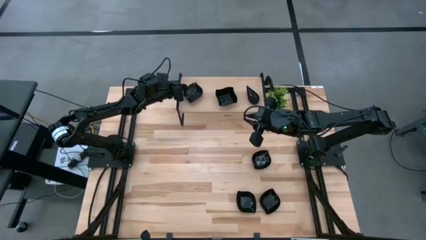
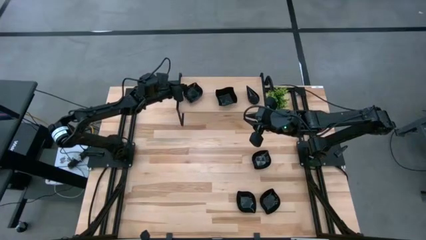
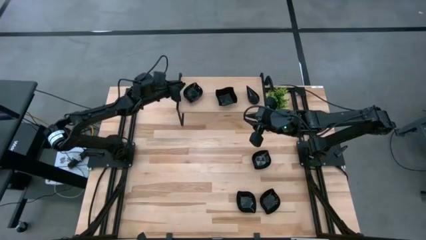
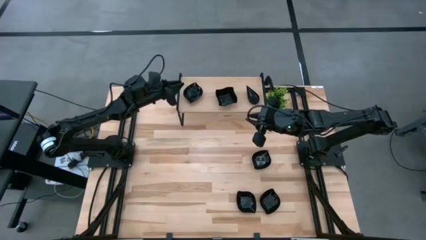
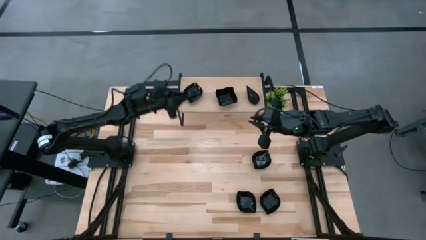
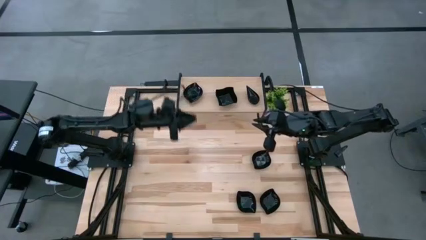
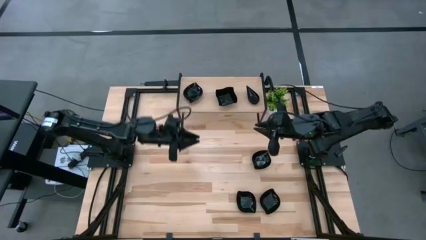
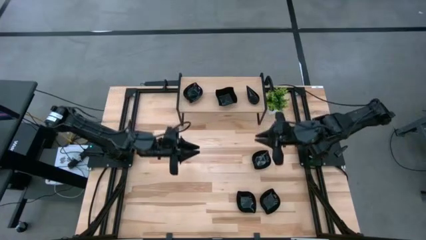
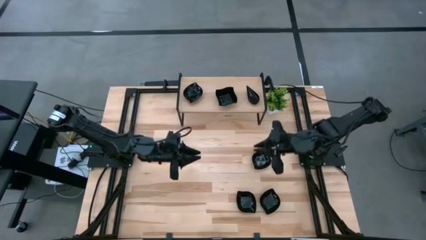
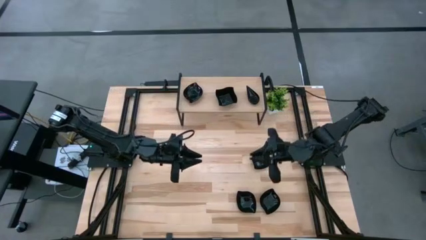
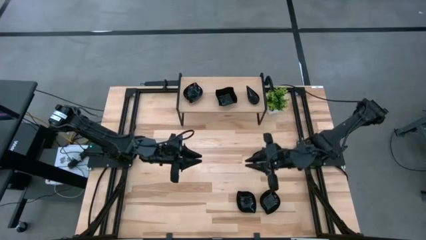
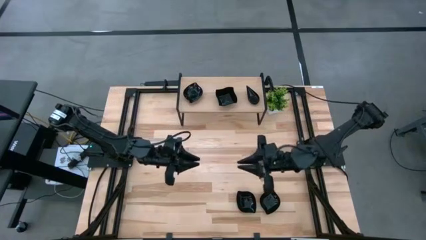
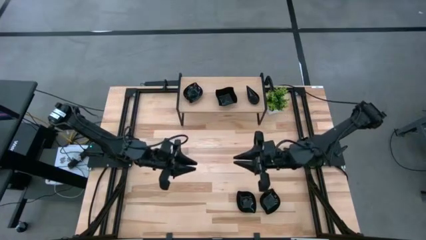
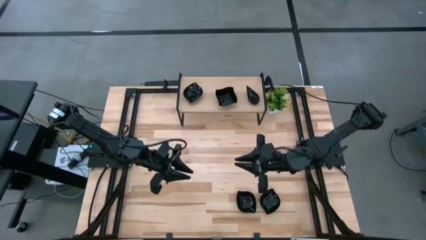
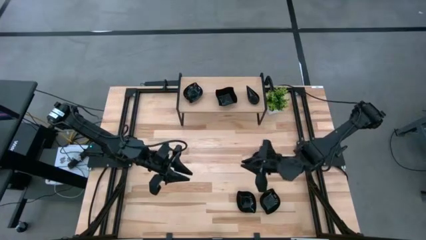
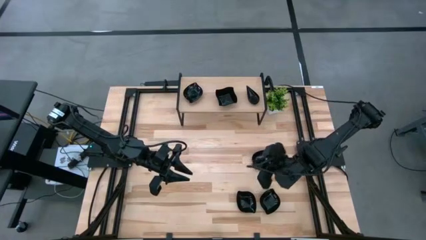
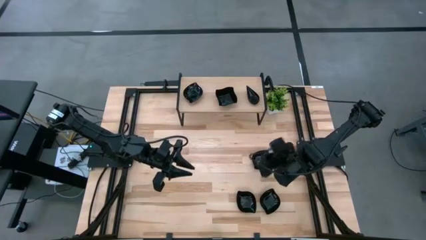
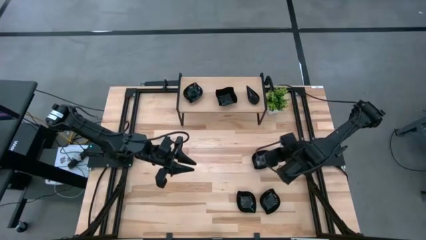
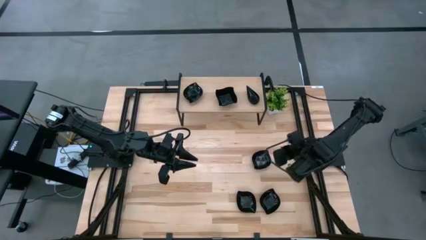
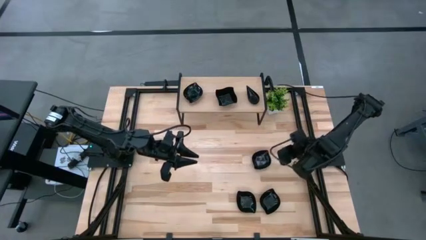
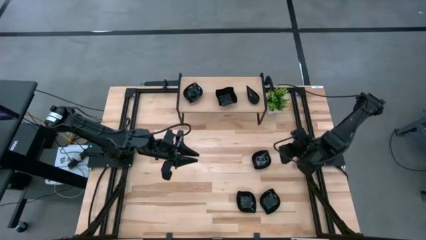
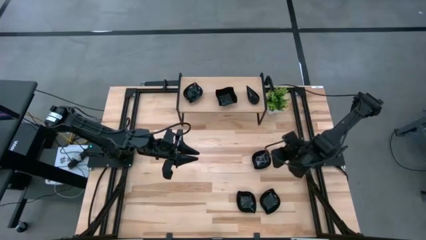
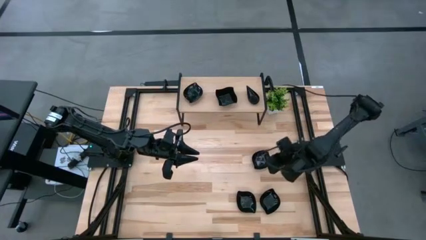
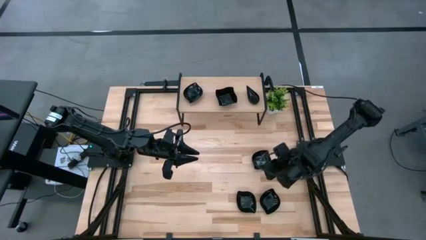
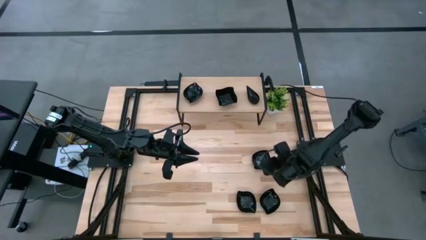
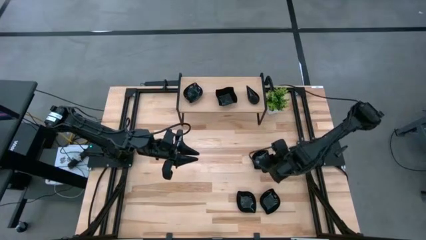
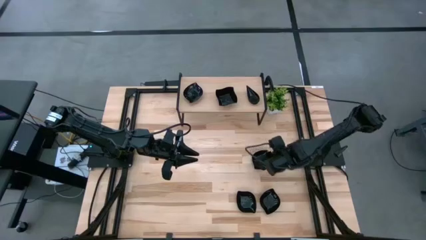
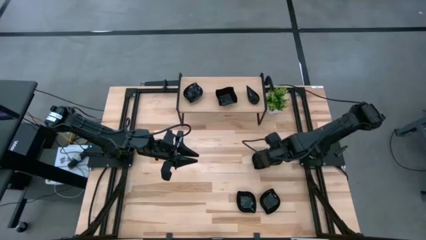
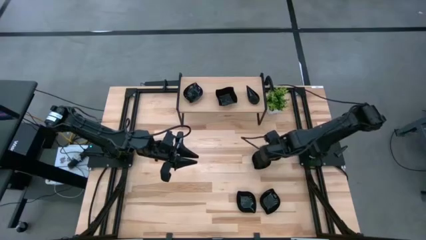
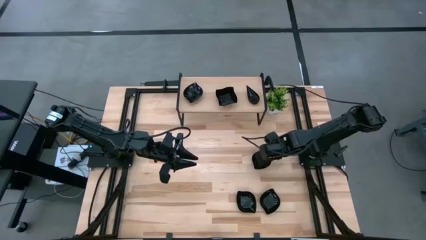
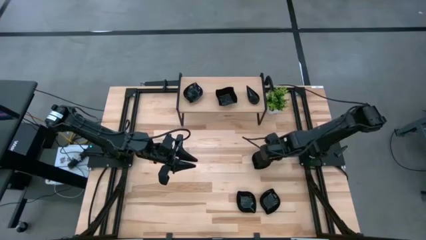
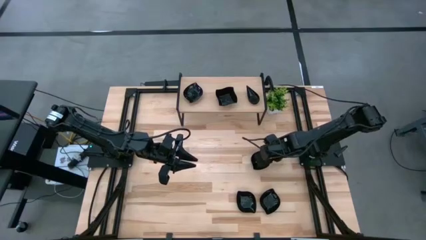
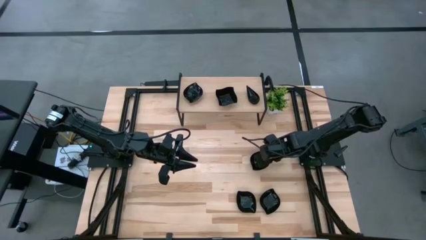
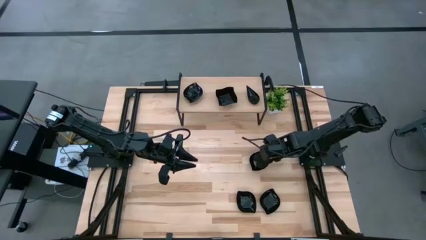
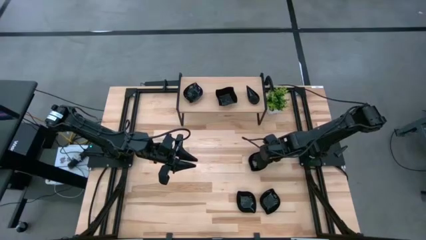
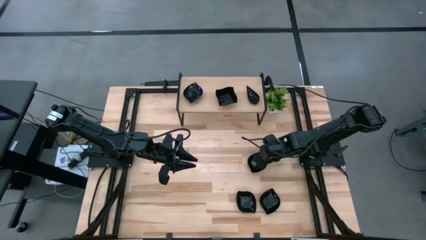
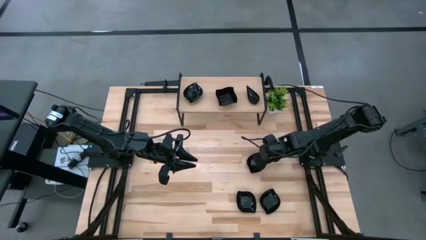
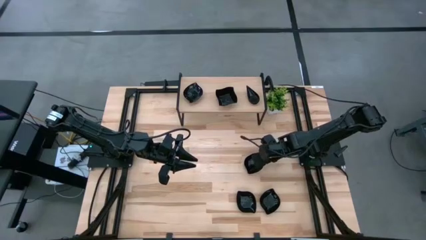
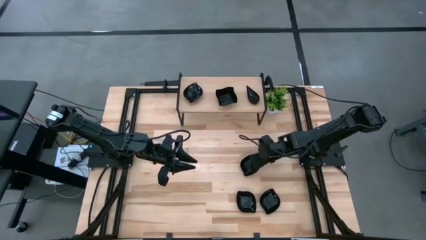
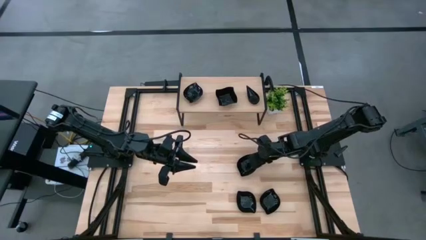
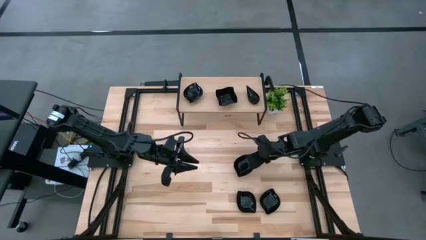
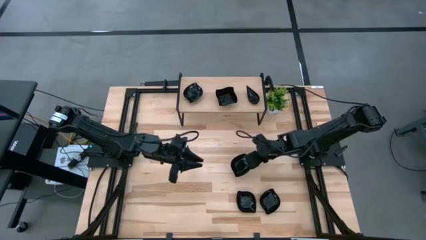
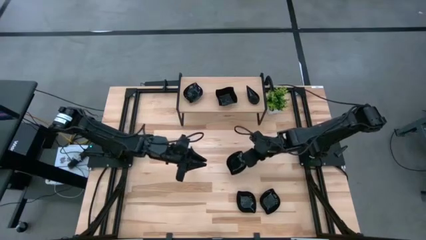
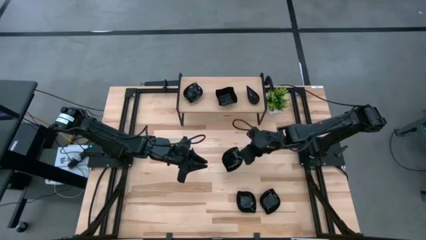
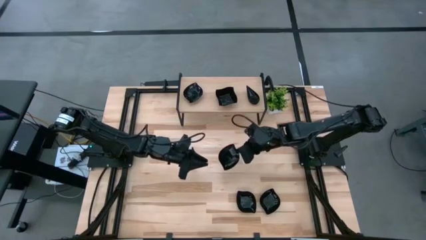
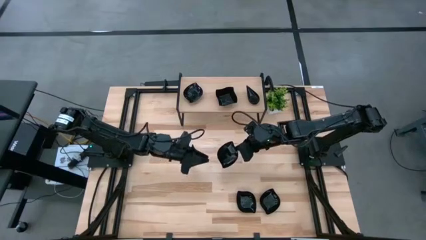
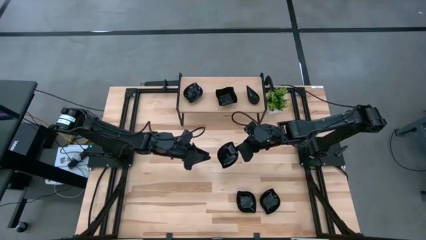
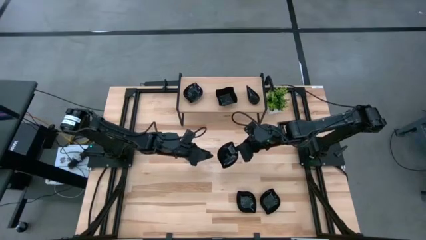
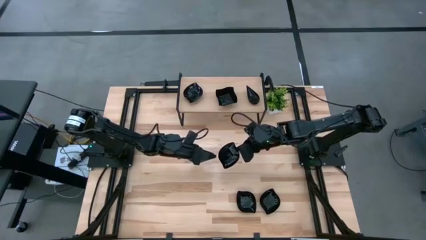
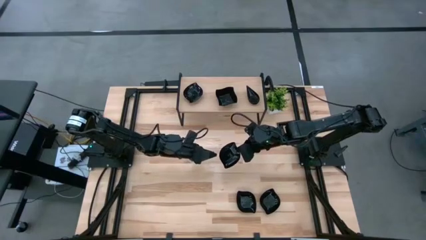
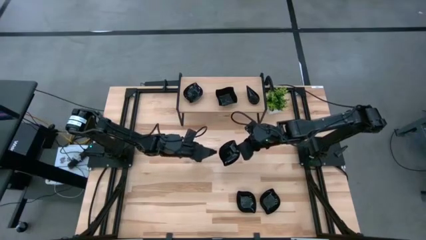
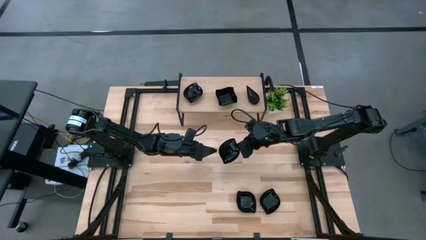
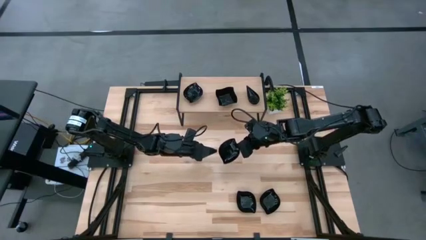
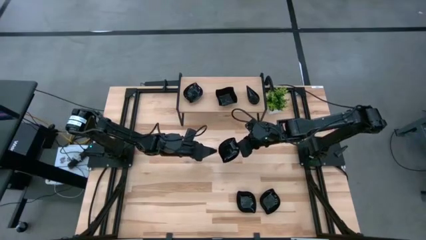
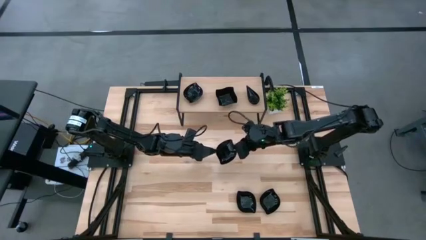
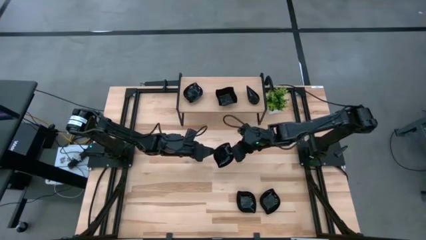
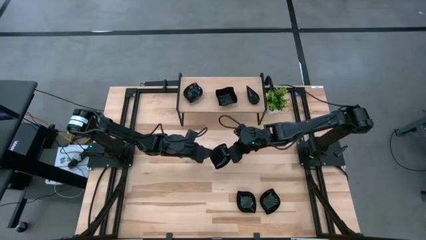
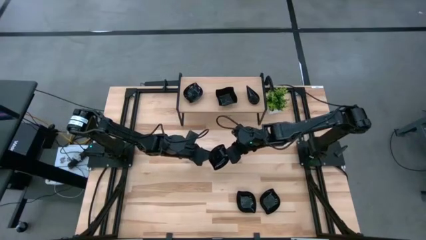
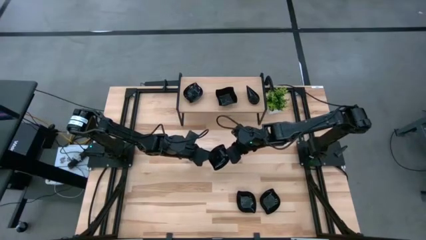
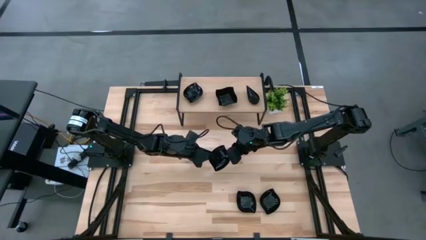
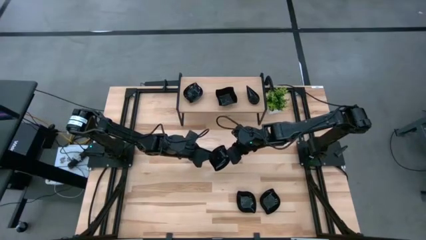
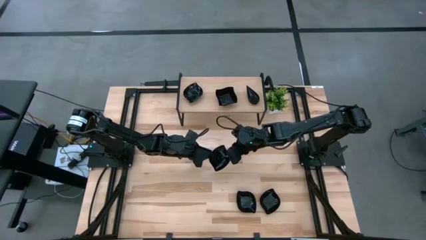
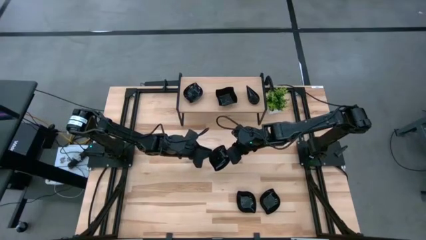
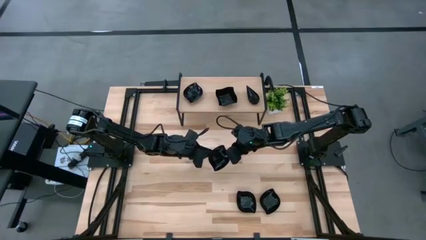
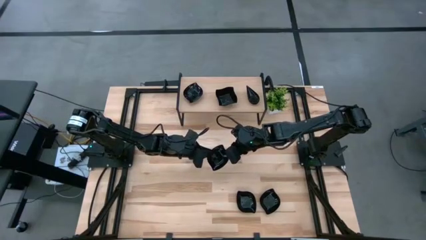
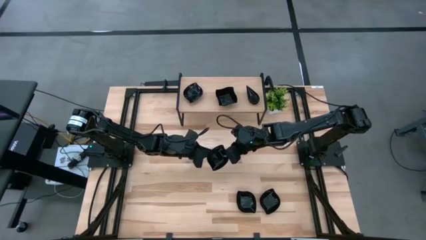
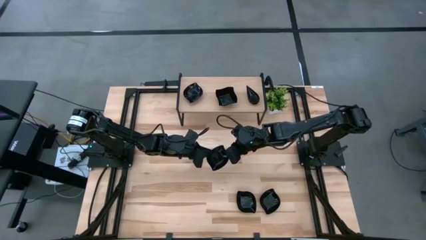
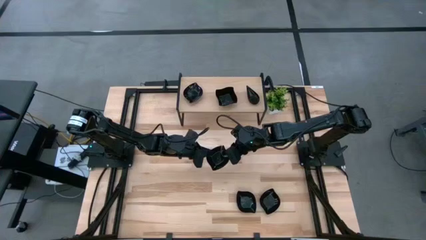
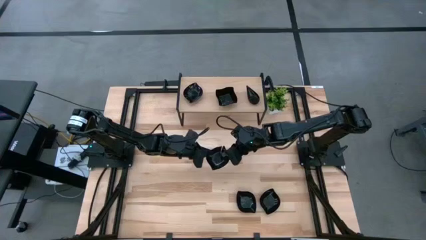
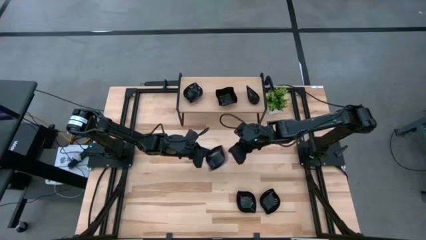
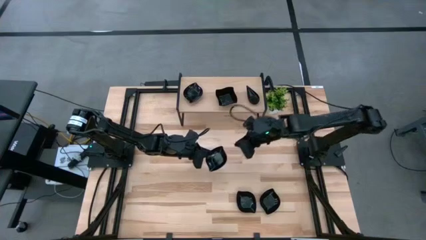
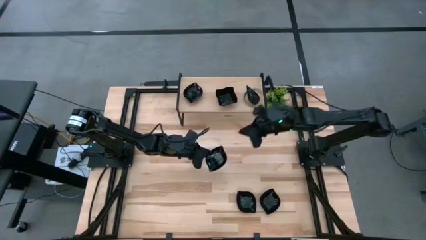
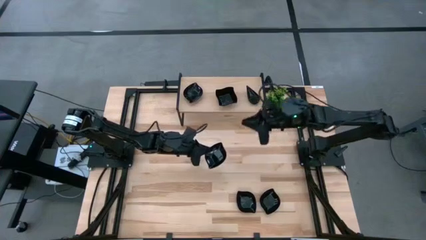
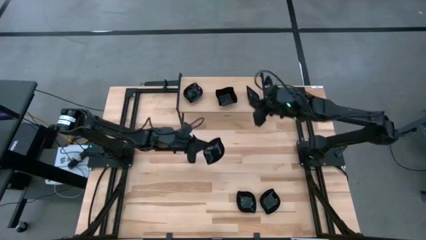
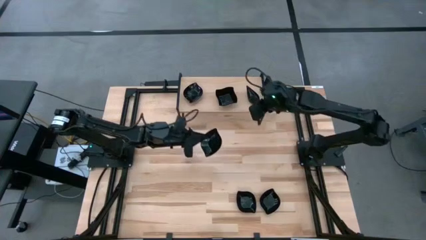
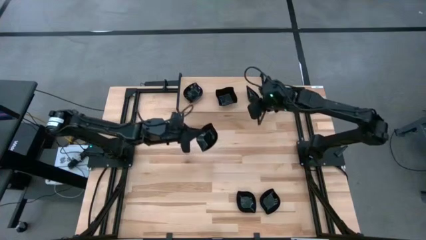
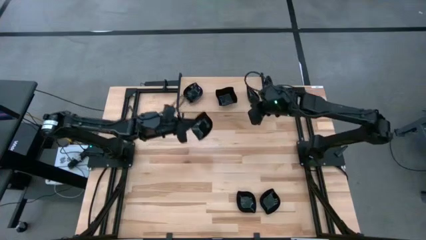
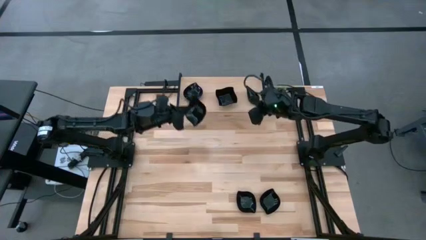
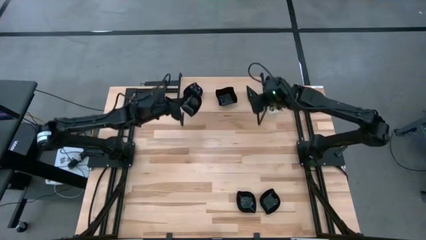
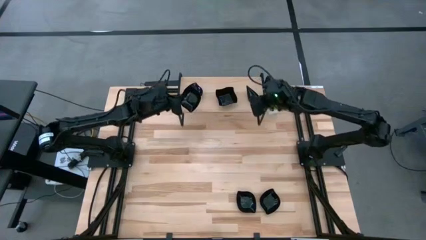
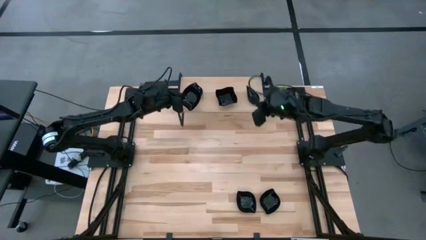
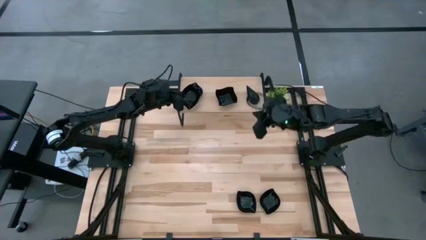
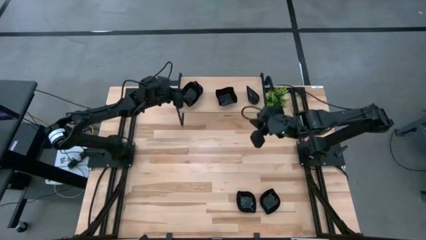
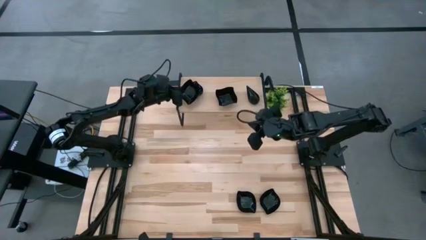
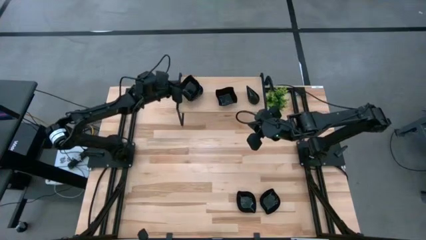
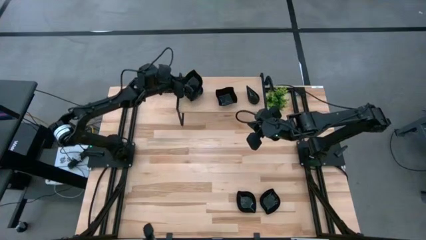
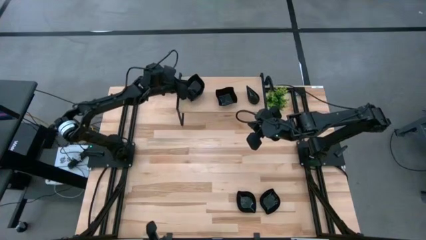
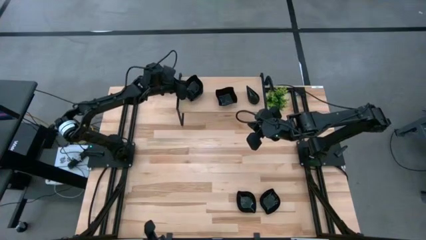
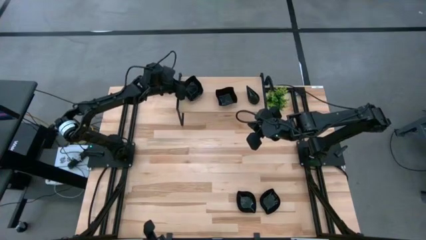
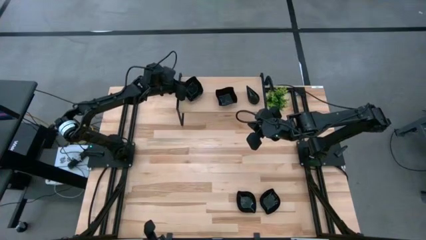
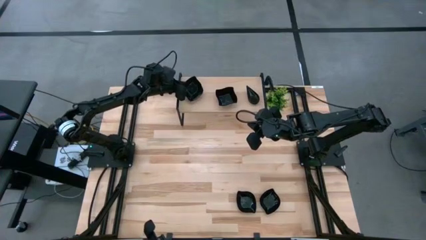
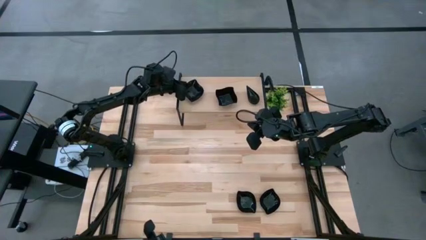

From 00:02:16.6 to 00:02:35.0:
Task: Pick & Place Mini shaped plates
Stack the black leaf shaped plate on top of the black leaf shaped plate on the shelf
